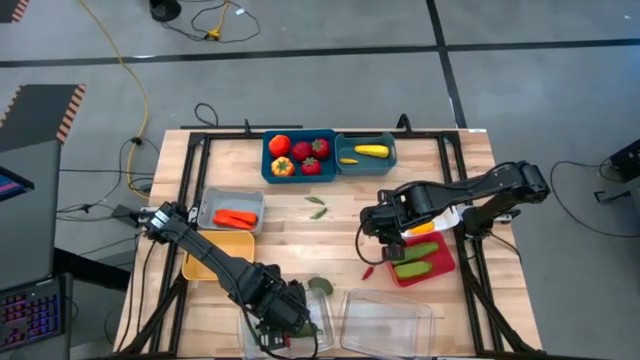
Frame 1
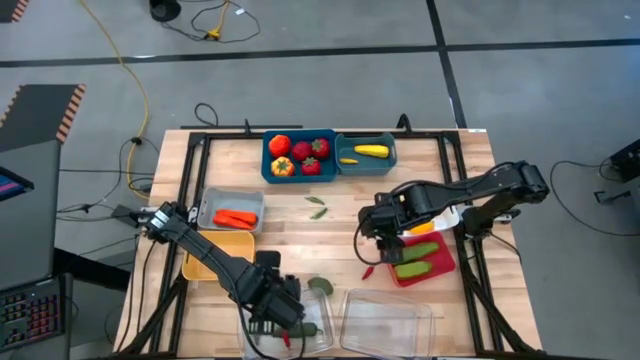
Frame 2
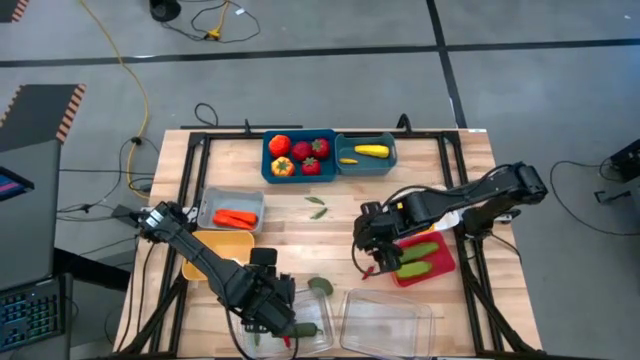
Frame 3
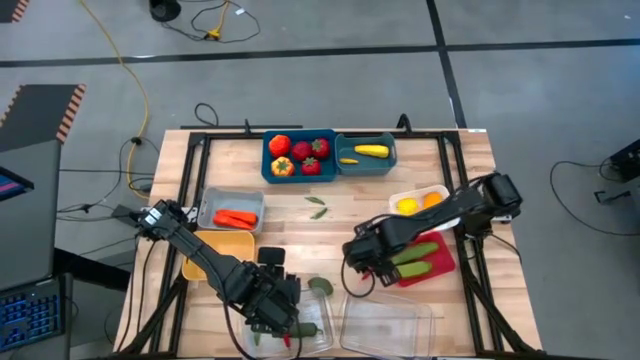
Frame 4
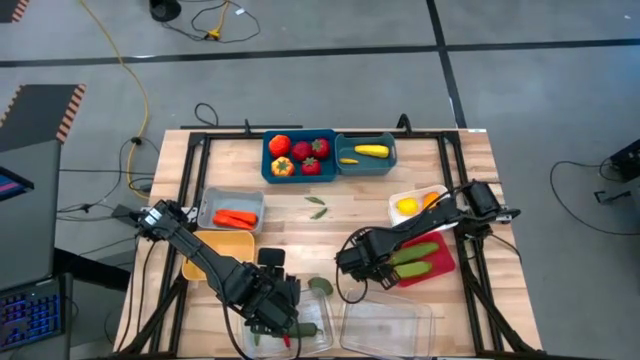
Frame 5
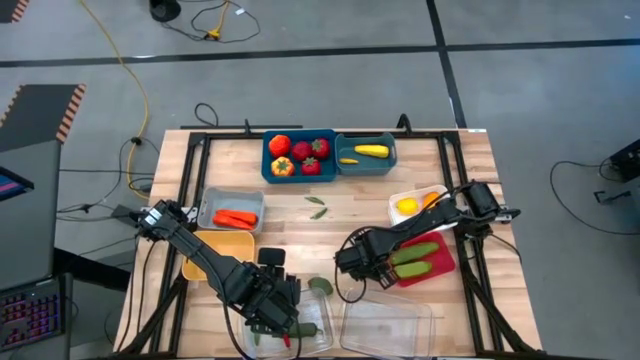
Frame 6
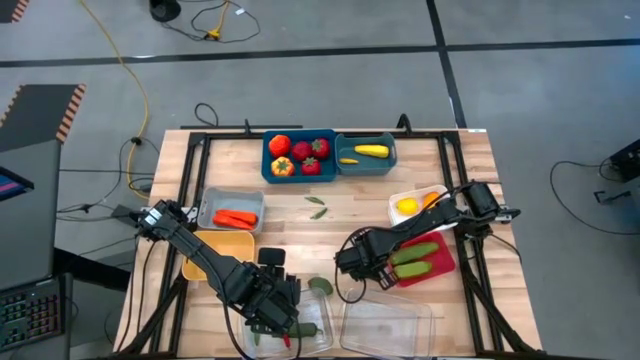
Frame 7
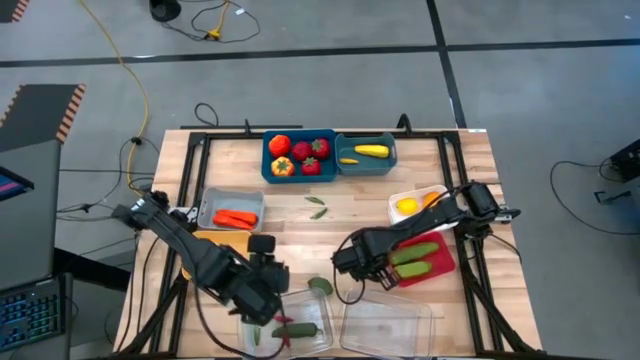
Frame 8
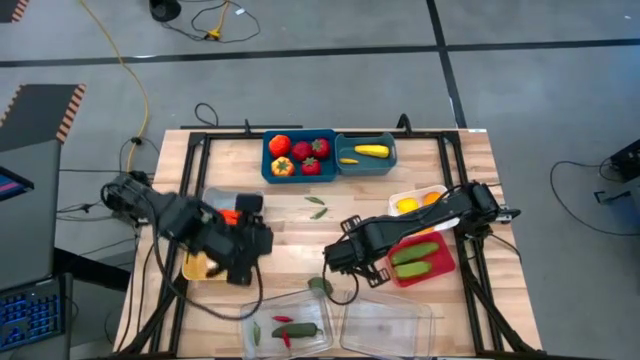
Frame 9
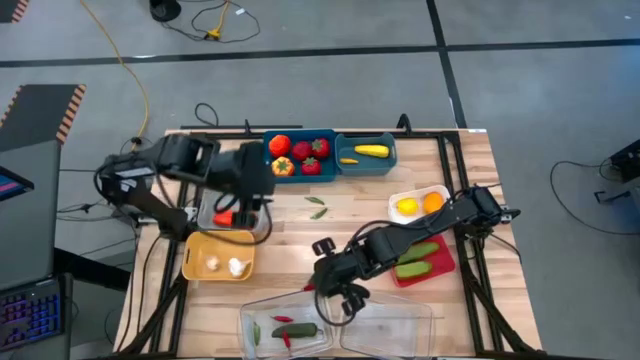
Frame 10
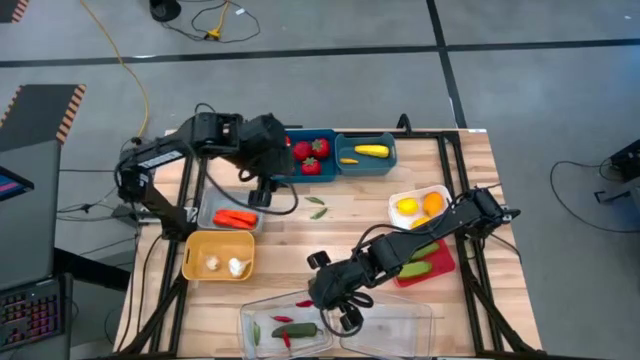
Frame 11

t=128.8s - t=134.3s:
Task: Sort produce into baskets
Put the red chili pepper into the left transparent bin

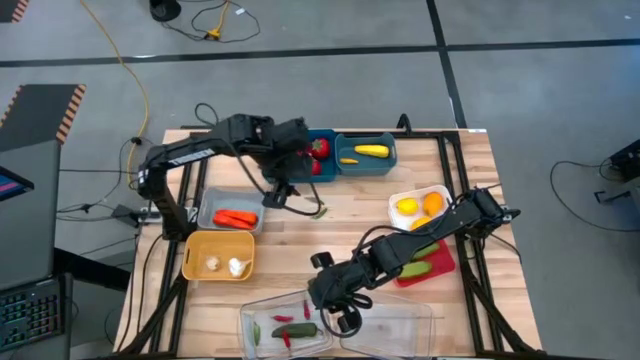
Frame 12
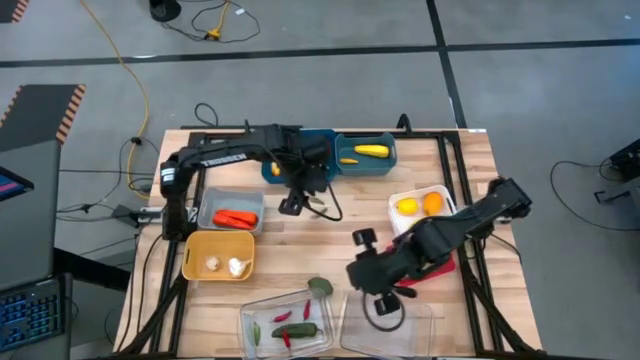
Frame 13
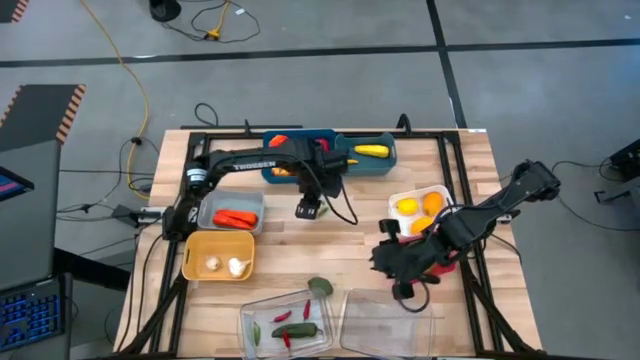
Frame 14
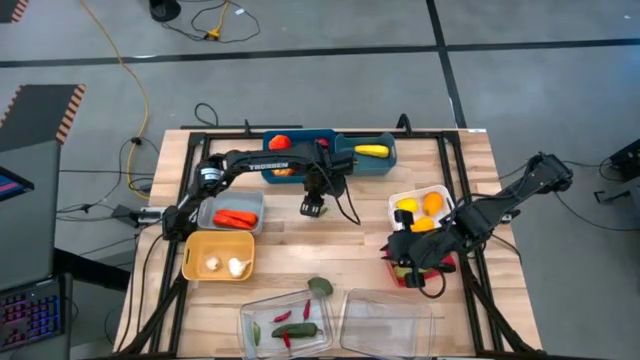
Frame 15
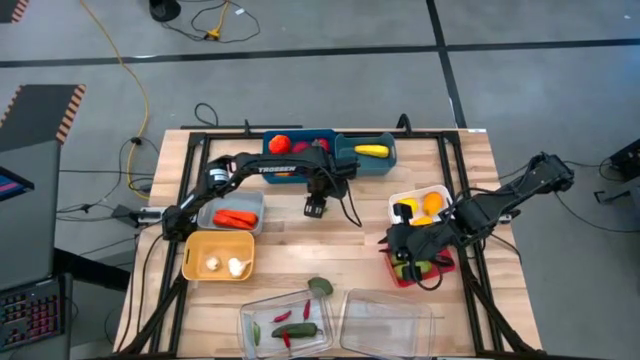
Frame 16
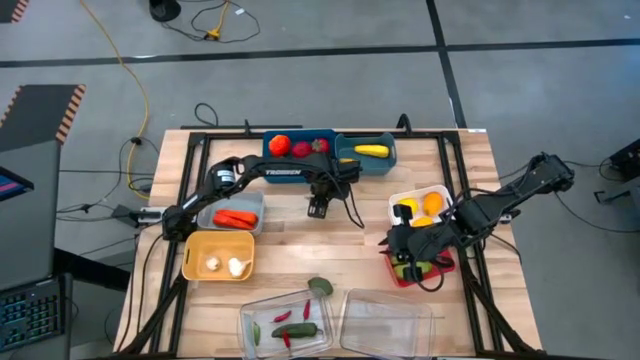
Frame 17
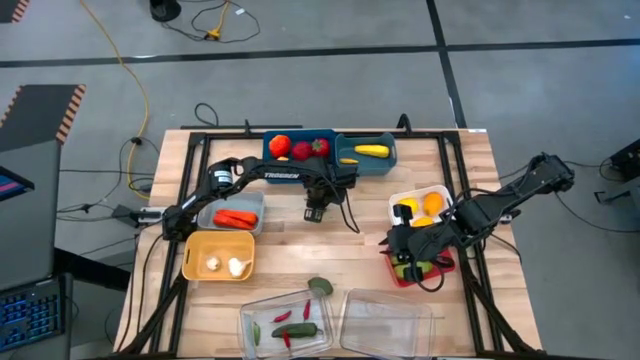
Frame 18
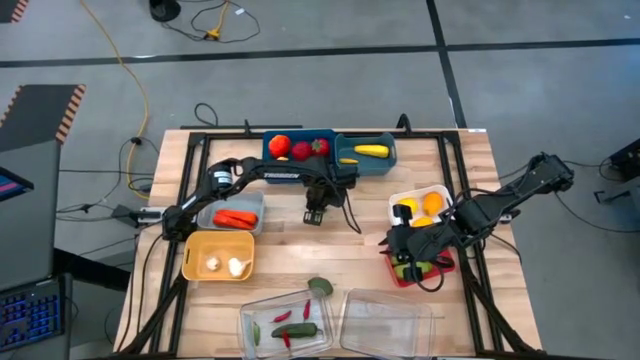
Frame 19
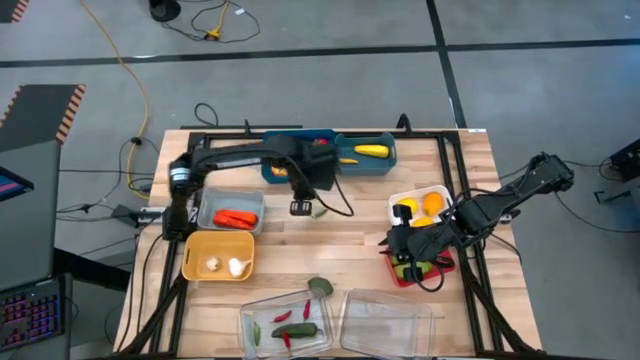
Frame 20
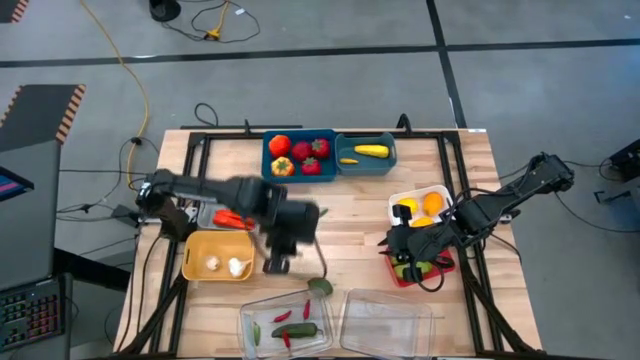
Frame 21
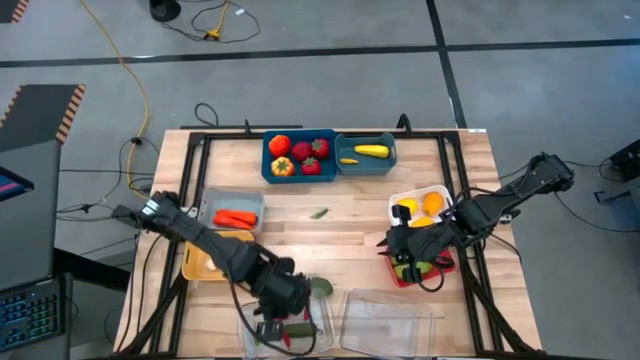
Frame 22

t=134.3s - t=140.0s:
Put the green chili pepper into the left transparent bin

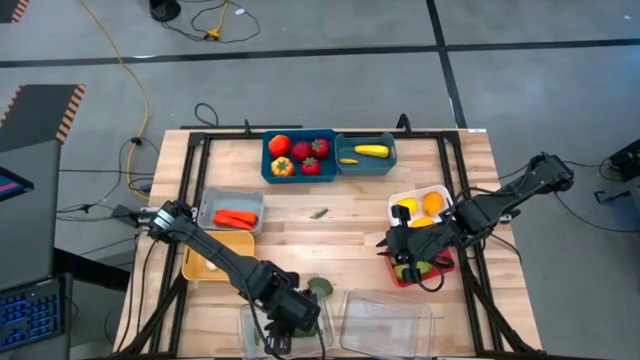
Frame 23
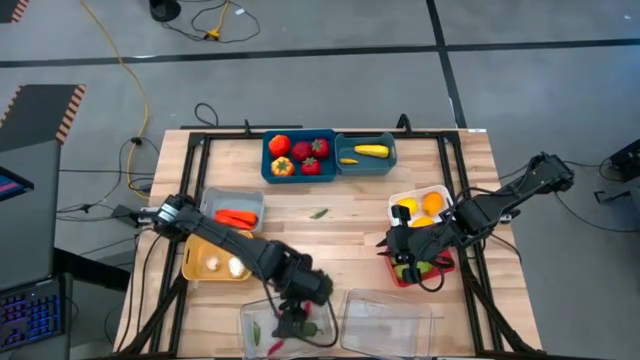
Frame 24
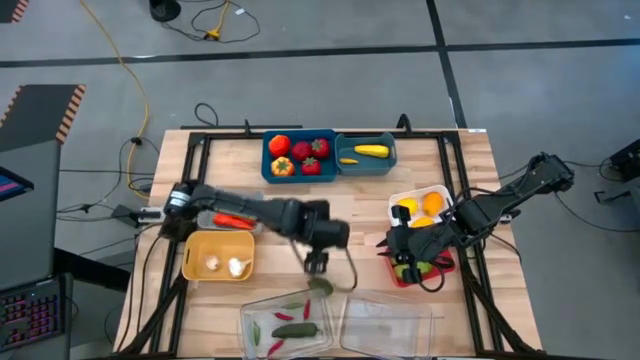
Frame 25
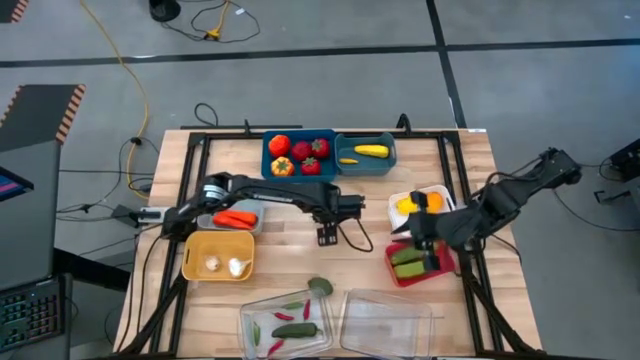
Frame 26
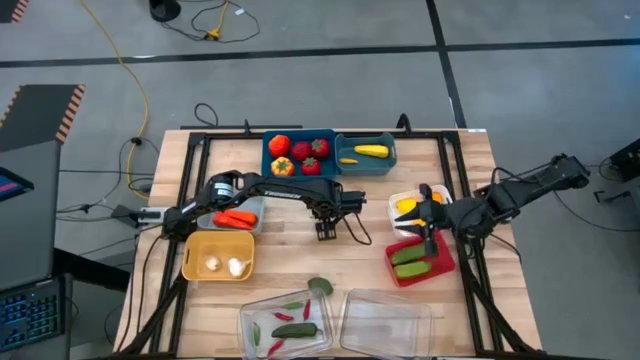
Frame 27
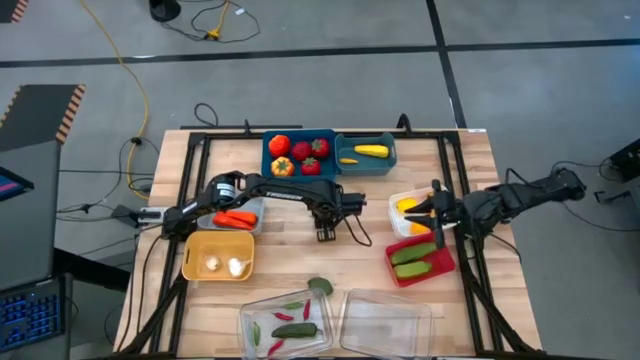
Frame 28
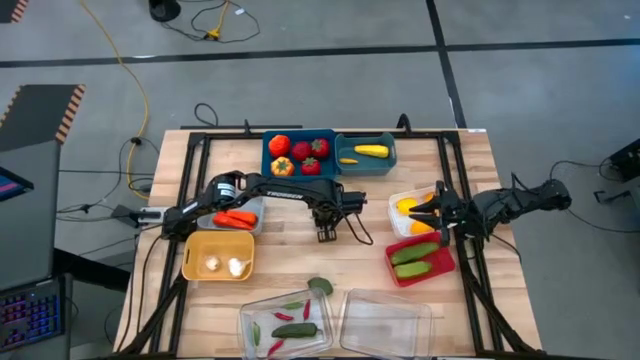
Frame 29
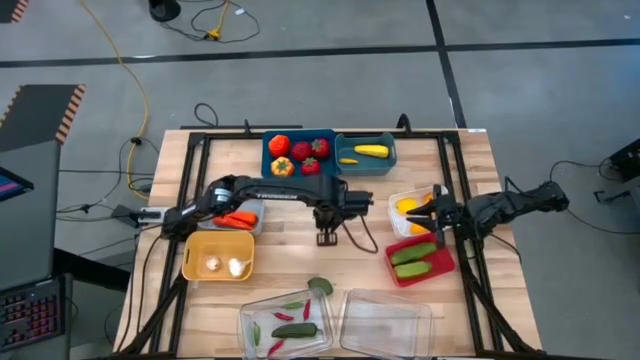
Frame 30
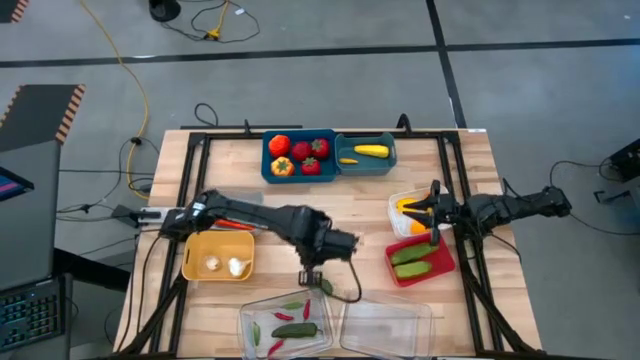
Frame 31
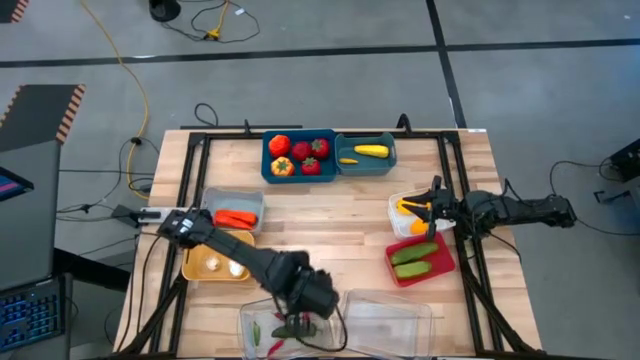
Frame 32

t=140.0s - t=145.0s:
Put the green chili into the bottom left transparent bin

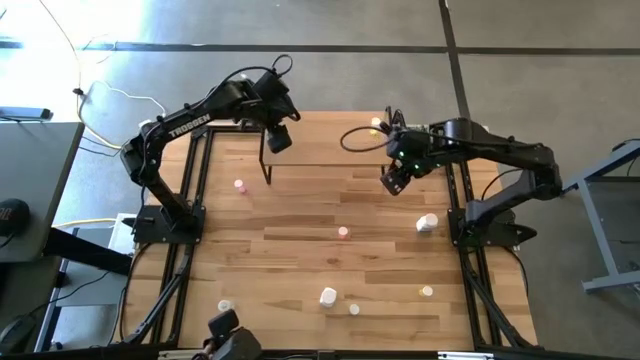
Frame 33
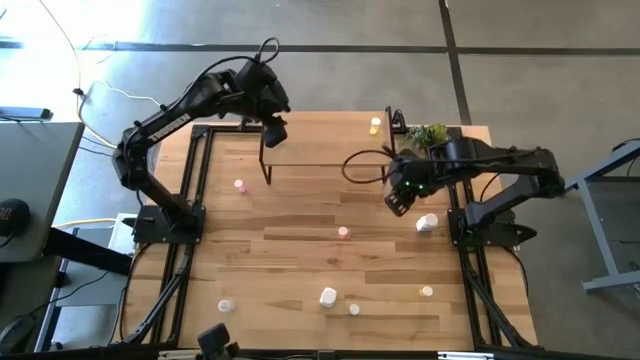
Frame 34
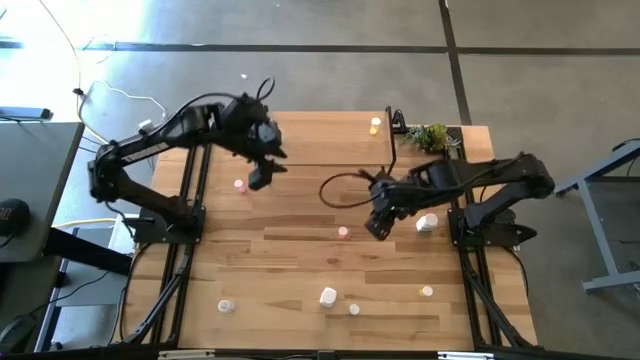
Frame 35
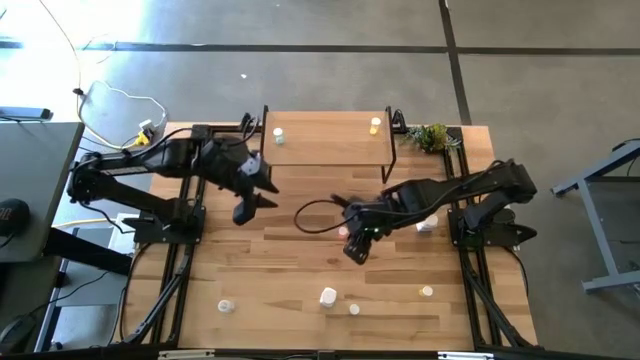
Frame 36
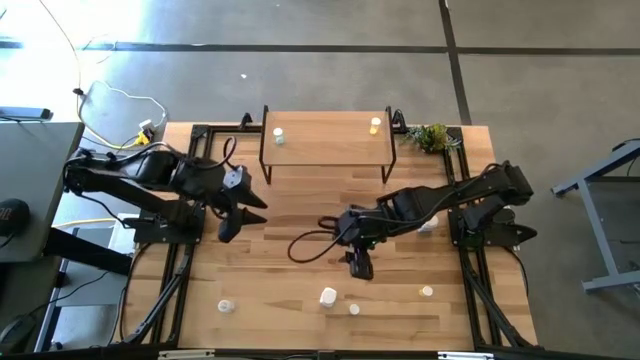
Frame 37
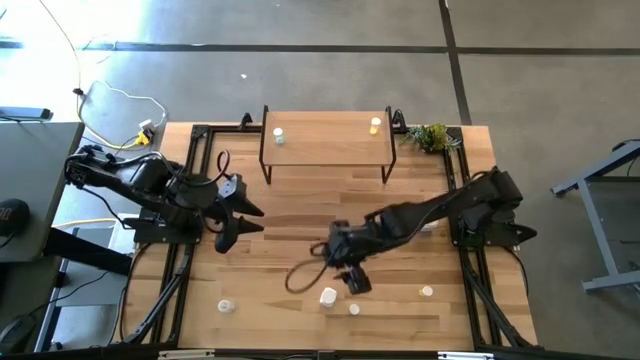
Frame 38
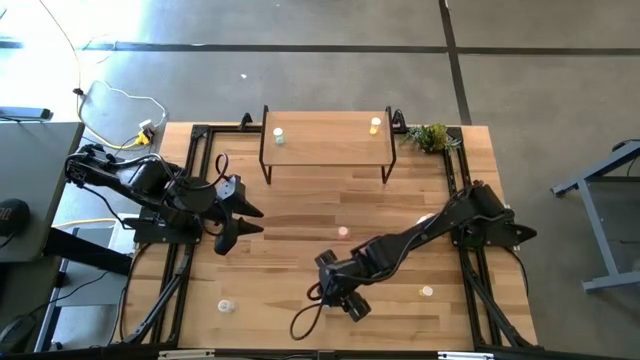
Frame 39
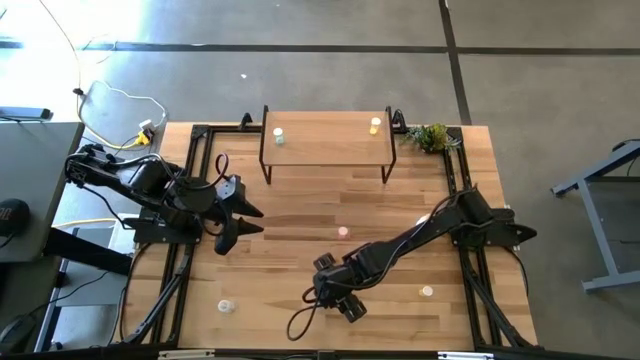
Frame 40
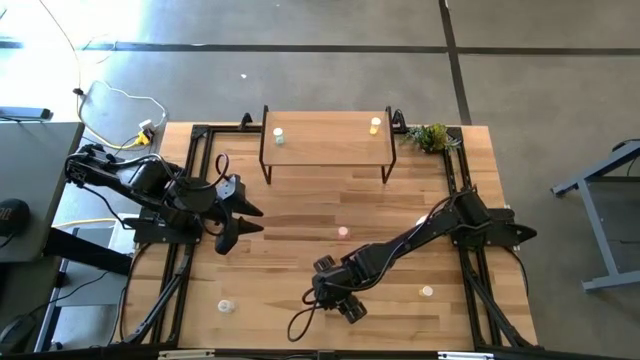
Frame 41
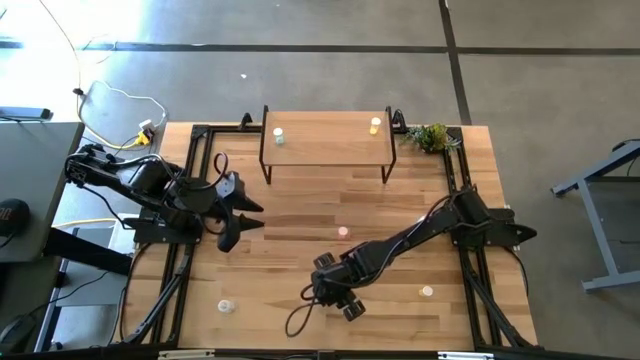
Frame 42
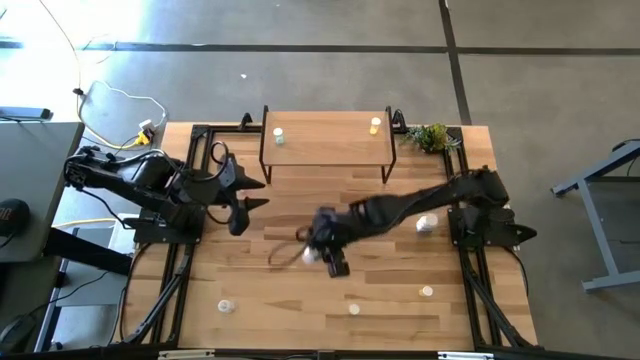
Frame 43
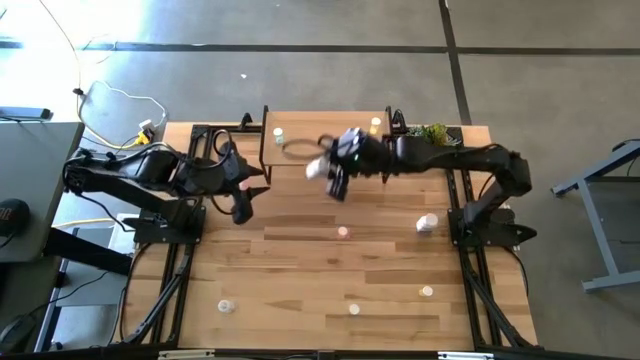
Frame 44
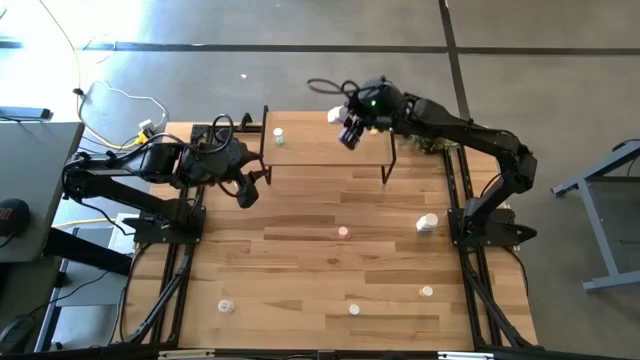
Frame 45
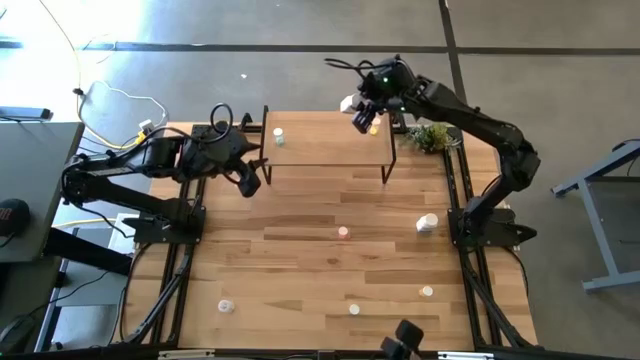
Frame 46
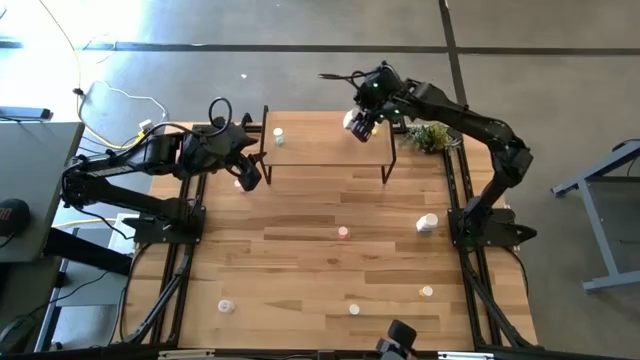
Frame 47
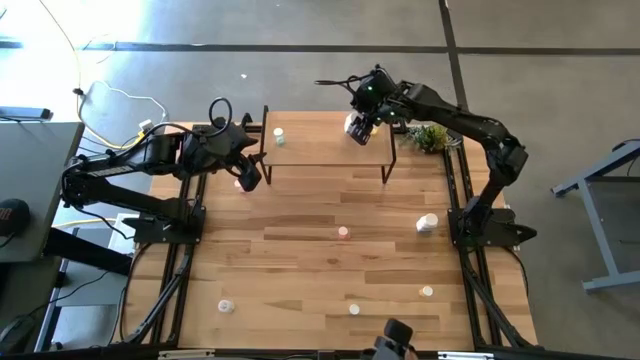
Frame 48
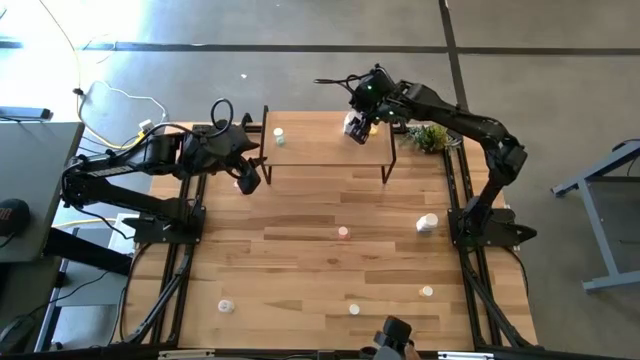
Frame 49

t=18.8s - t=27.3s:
Task: Pick and place medicine bottles onto shelf by color
Put the bottom white pill bottle on the shelf
